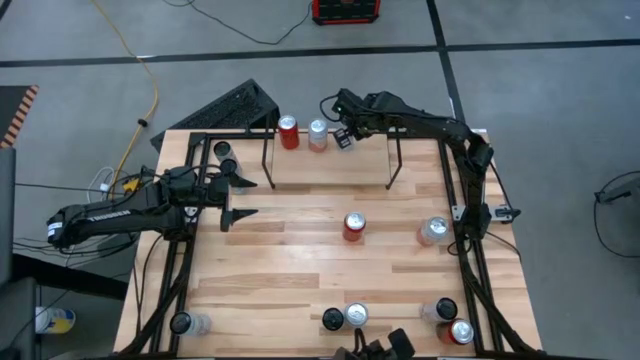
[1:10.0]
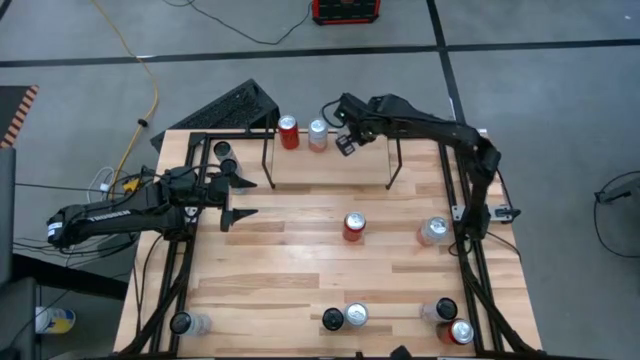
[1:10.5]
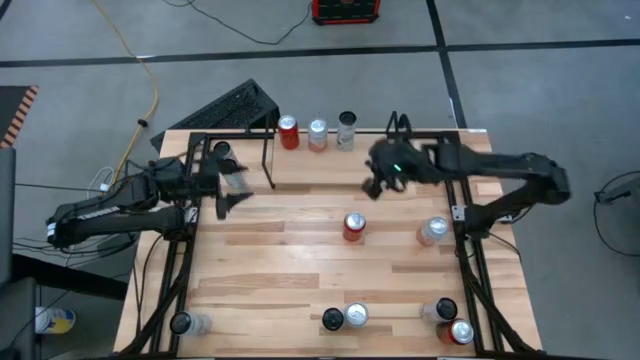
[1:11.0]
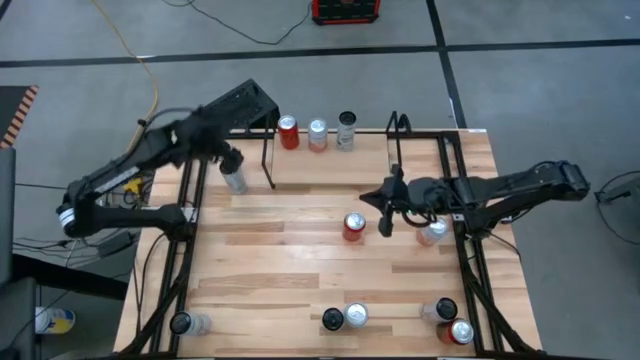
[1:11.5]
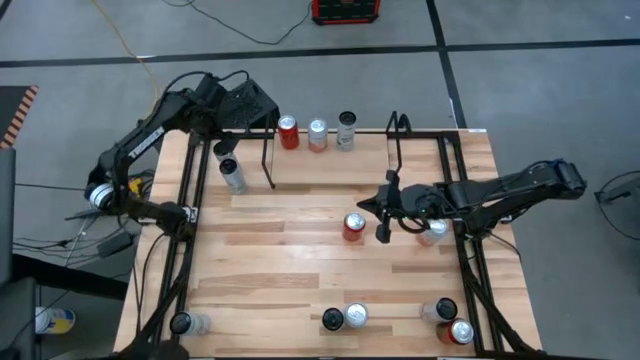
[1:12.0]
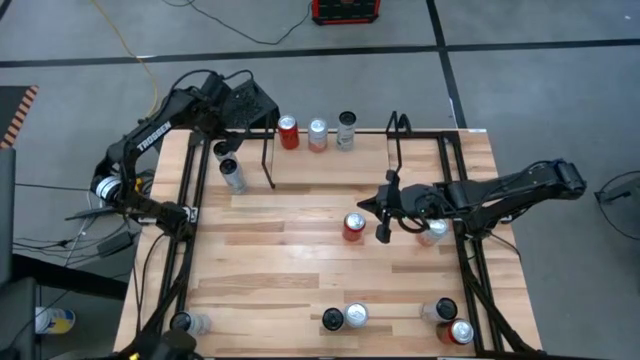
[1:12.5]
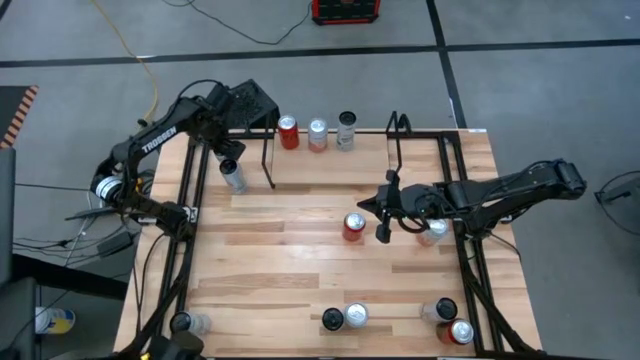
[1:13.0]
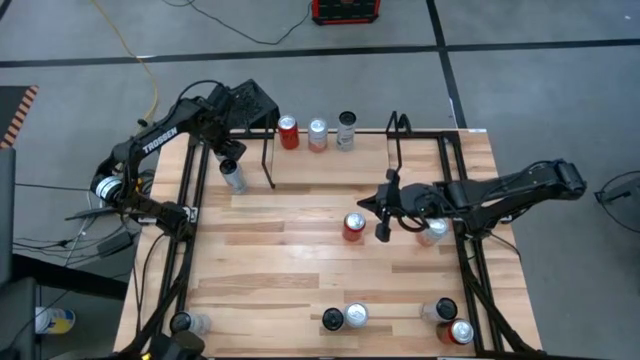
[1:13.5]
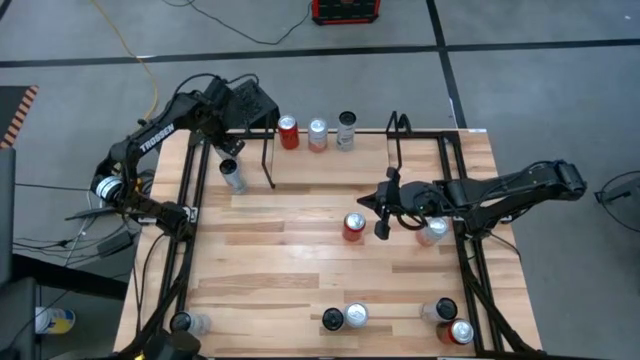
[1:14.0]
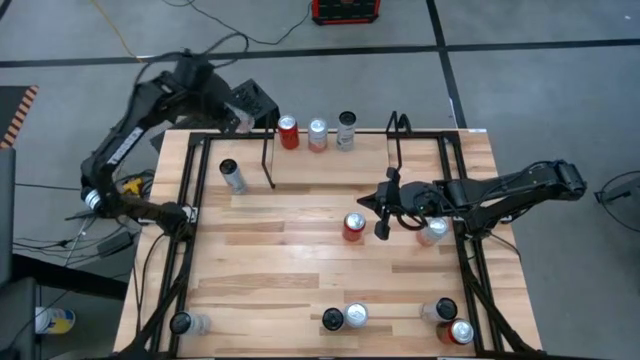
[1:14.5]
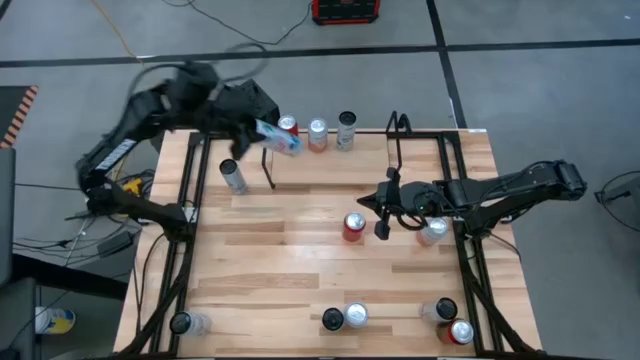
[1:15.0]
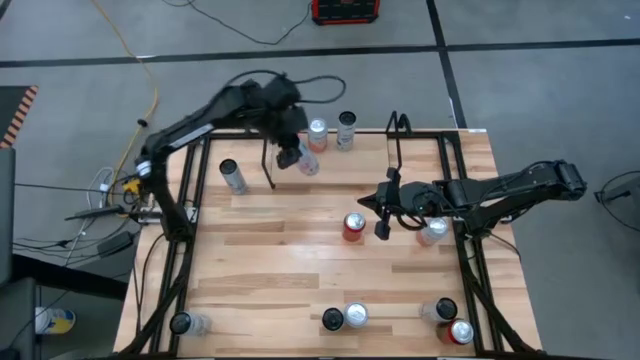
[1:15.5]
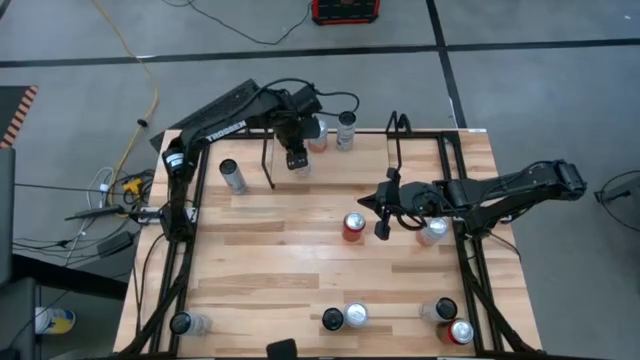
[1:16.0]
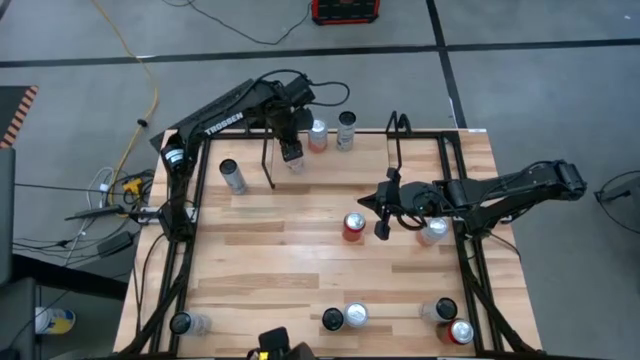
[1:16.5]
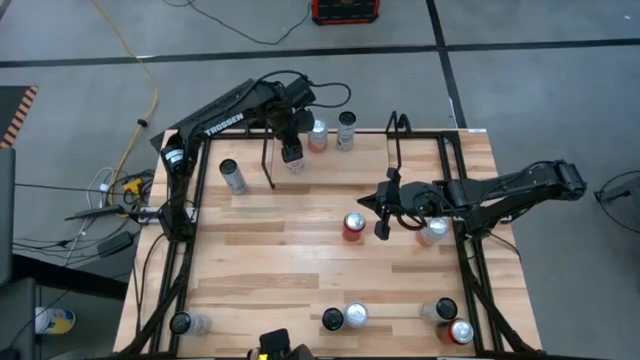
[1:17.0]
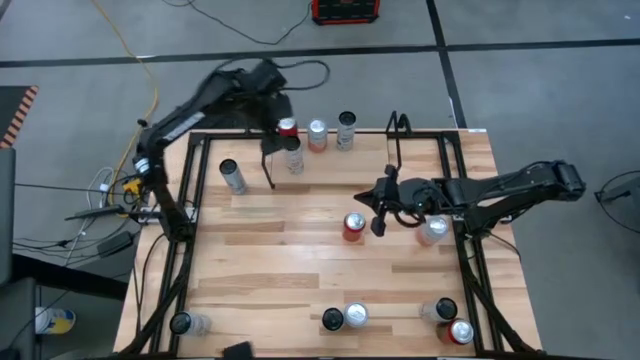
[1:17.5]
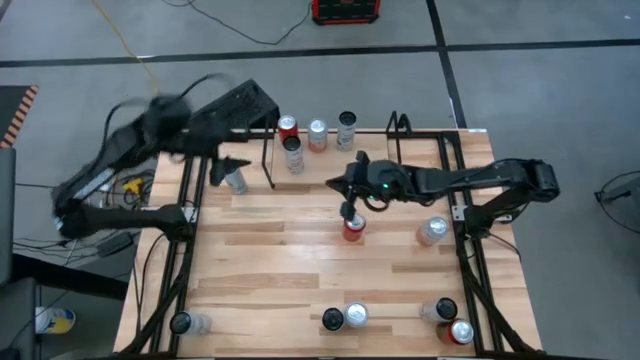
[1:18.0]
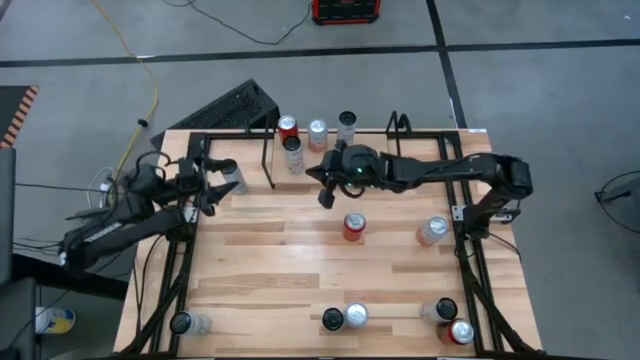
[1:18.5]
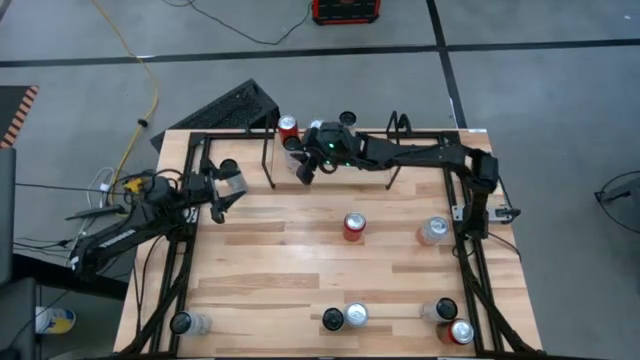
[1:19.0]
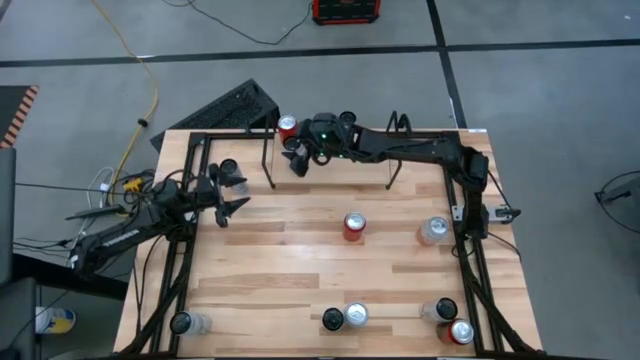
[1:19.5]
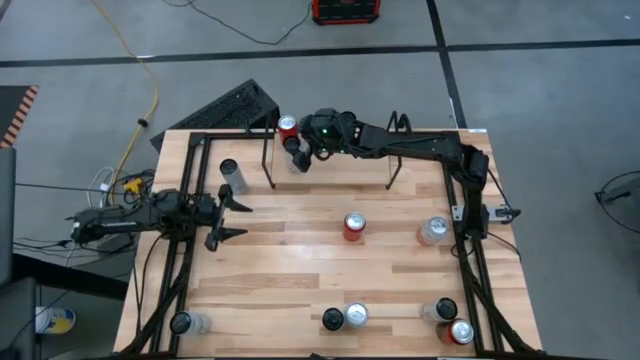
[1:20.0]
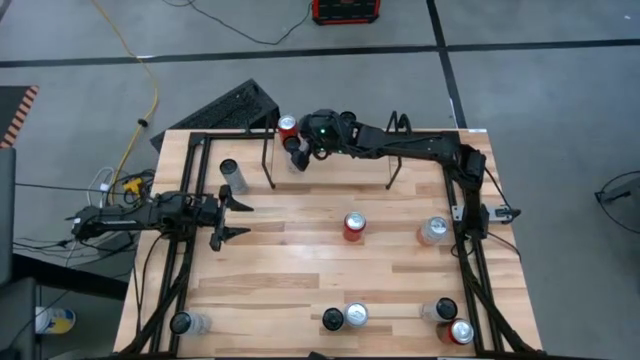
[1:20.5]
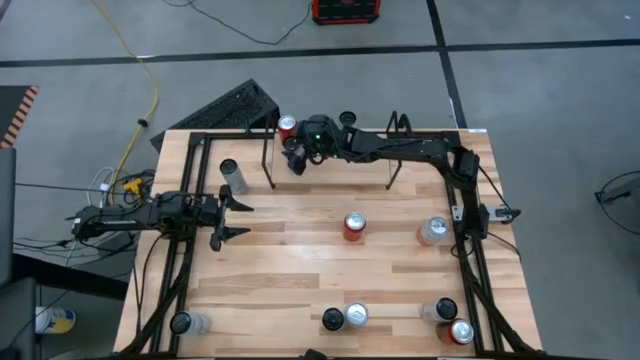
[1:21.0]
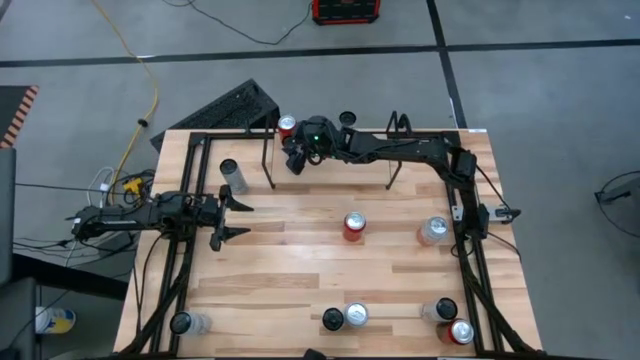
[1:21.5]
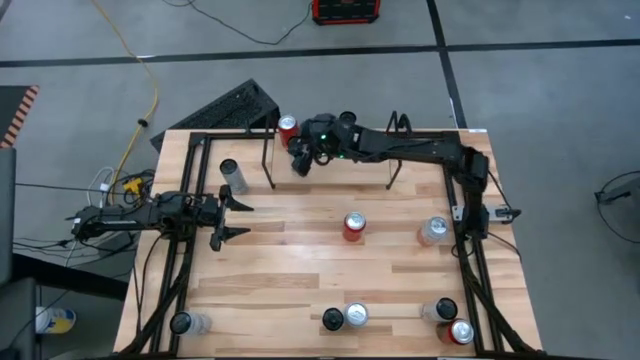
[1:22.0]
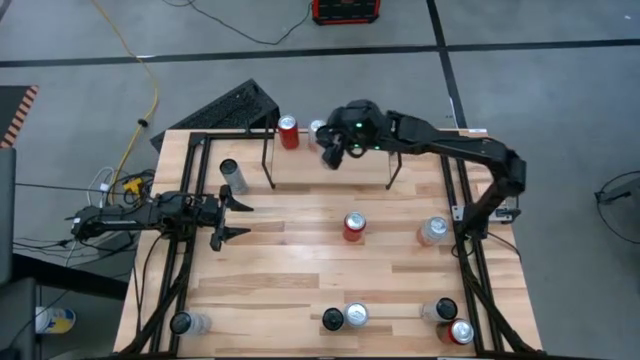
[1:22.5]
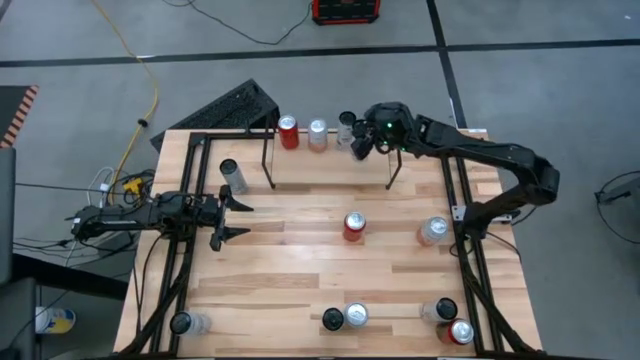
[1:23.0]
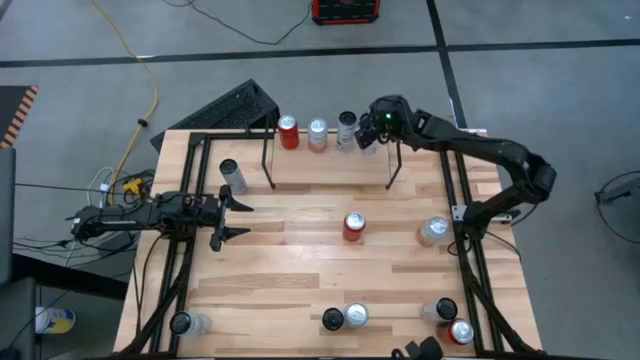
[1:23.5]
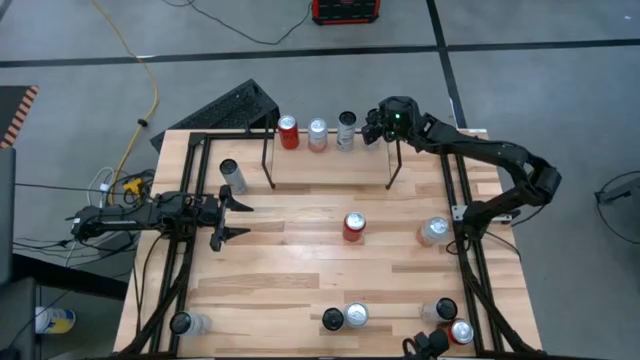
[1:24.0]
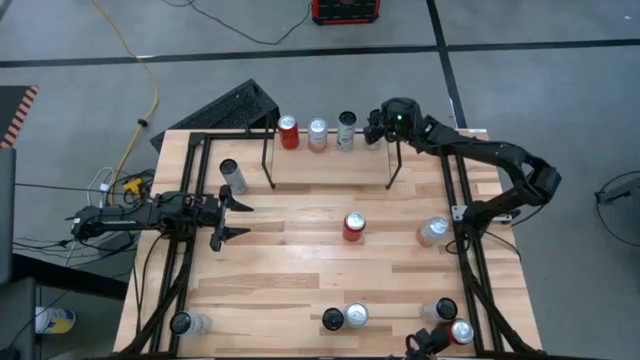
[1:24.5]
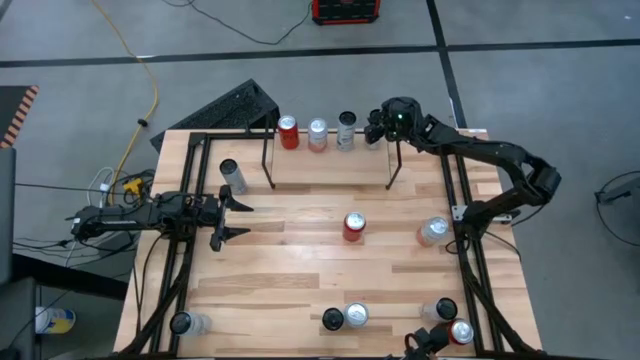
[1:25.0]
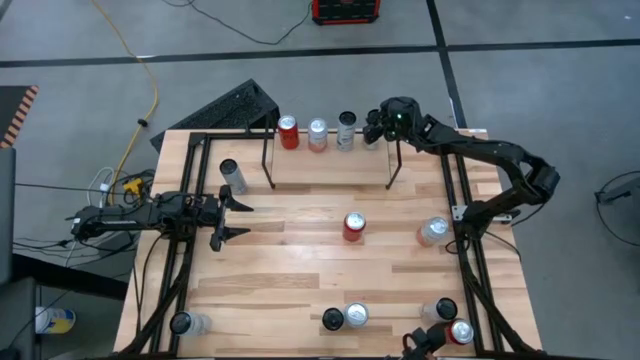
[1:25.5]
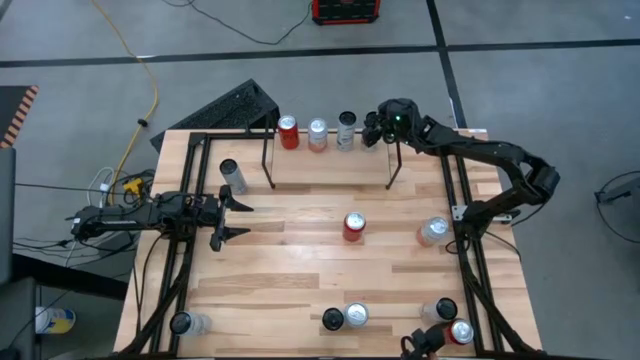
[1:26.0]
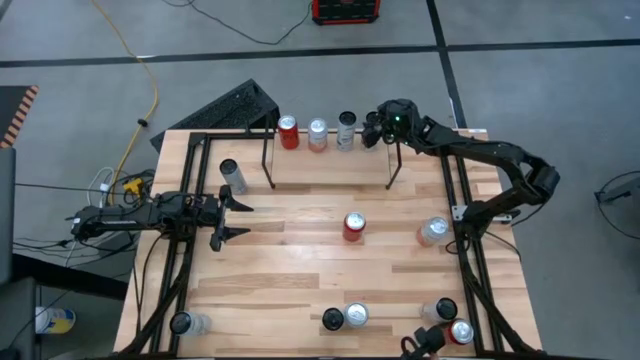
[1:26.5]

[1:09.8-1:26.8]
Task: Place canned beverage on shelf
Put the top white pink soda can on the shelf

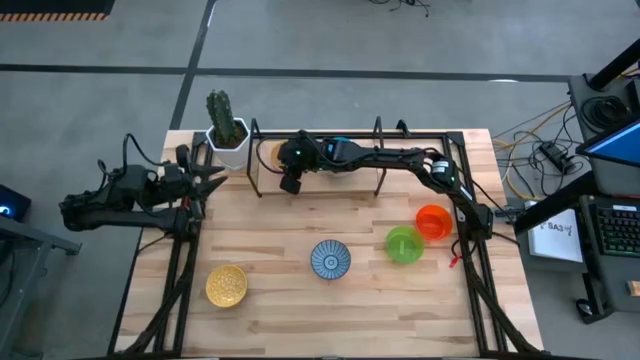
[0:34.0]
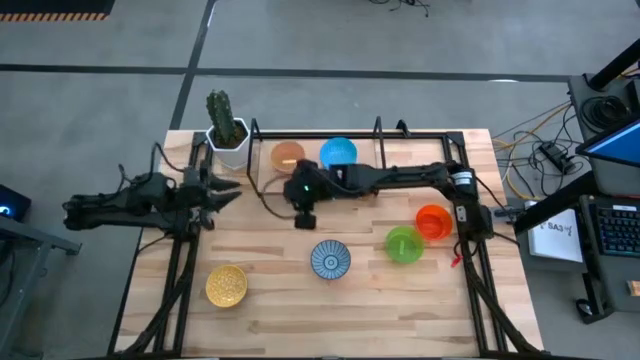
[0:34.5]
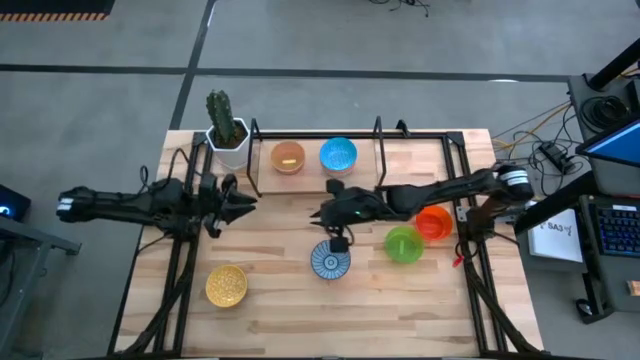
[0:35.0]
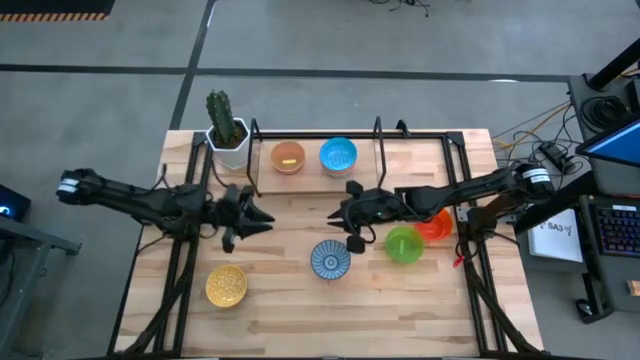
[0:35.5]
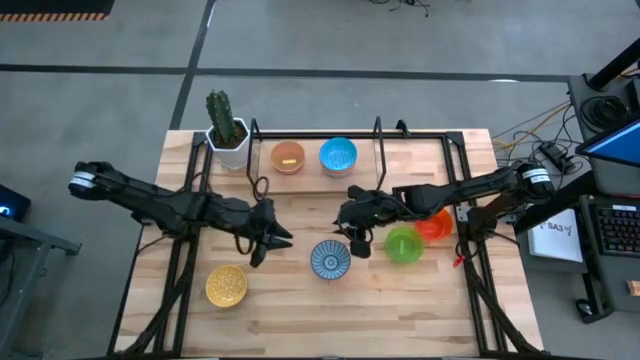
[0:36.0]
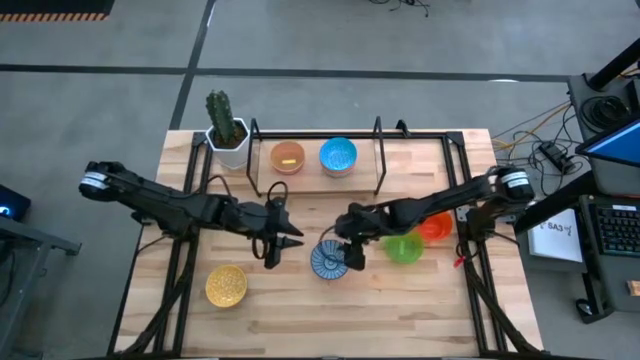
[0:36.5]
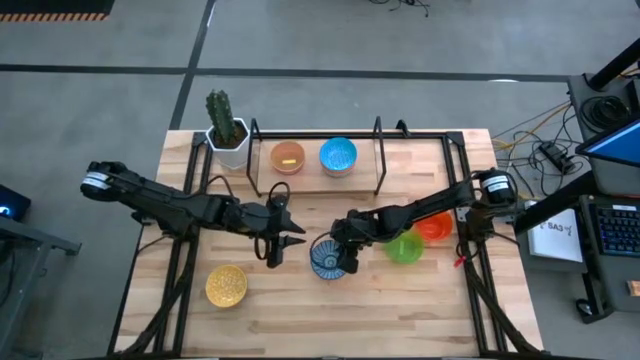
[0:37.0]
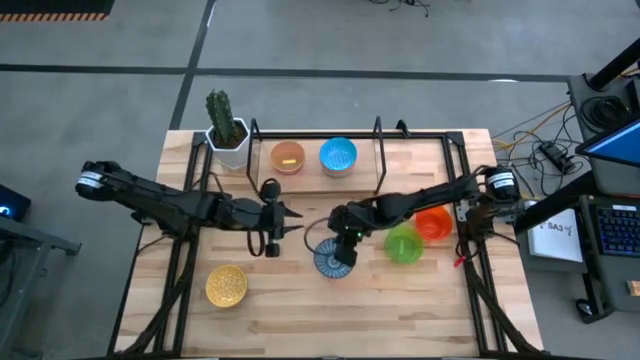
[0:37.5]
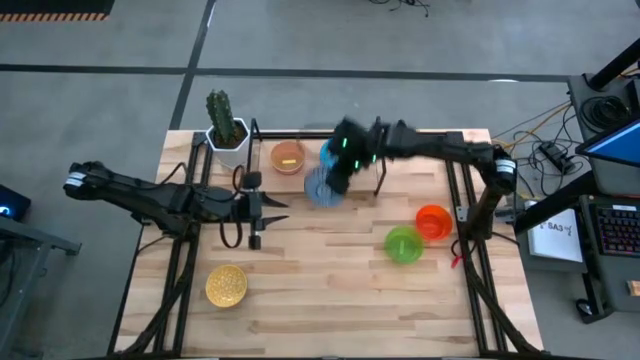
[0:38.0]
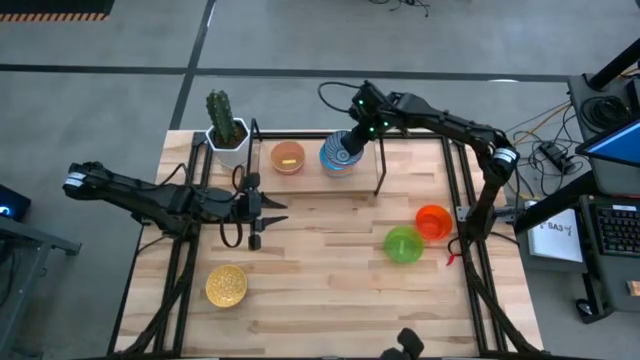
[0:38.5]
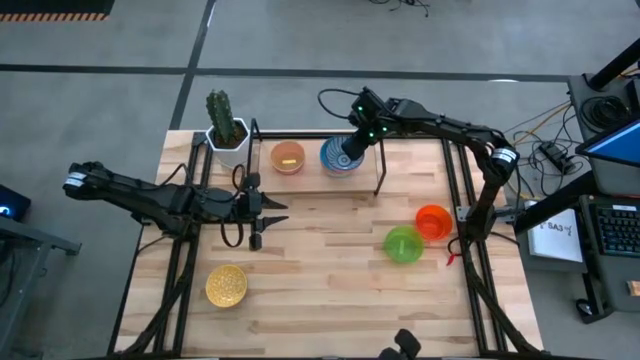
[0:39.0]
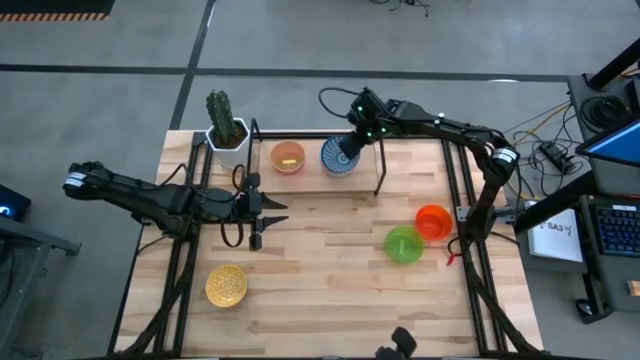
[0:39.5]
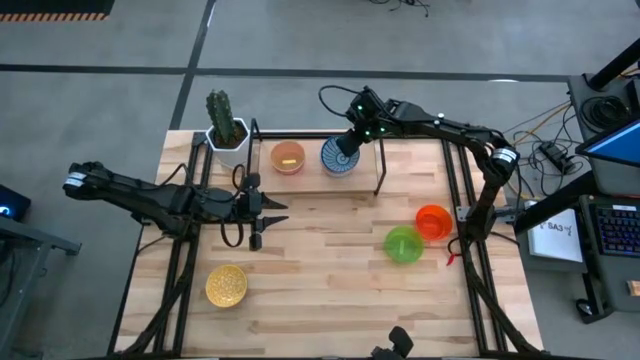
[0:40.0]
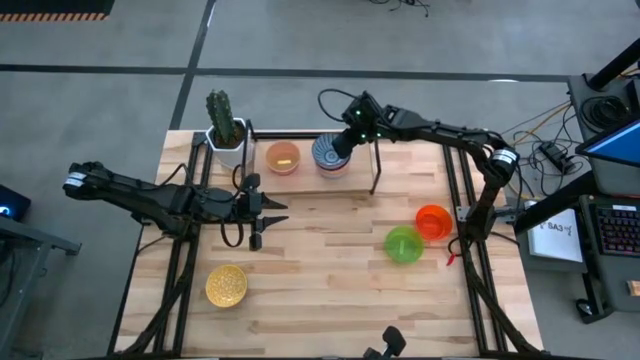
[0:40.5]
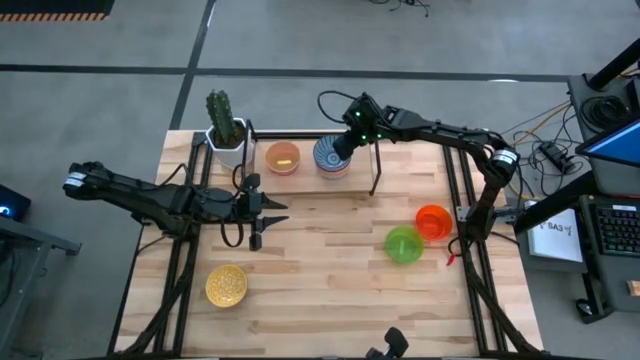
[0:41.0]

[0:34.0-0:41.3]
Task: Place and stack bowls onto a shelf
Stack the red-blue patterned bowl on top of the orange-blue patterned bowl on the shelf
